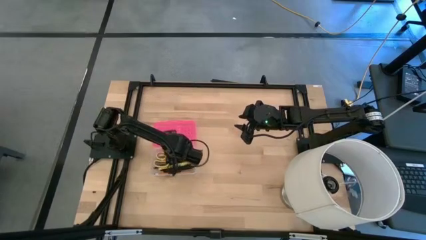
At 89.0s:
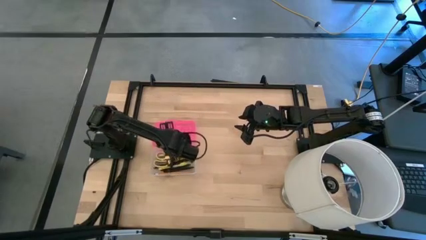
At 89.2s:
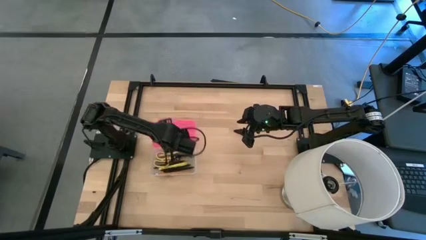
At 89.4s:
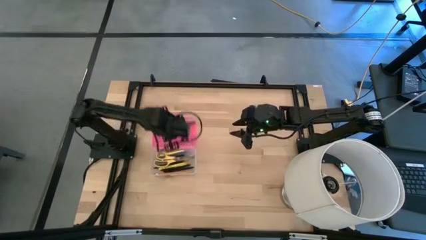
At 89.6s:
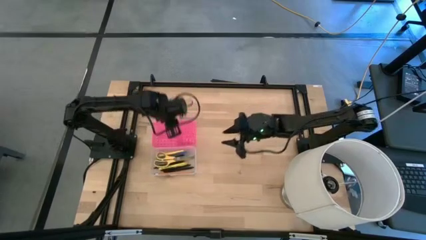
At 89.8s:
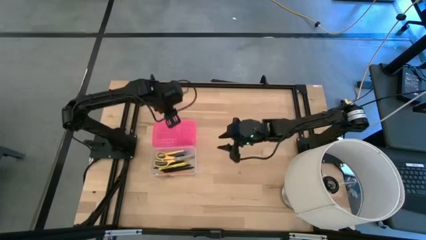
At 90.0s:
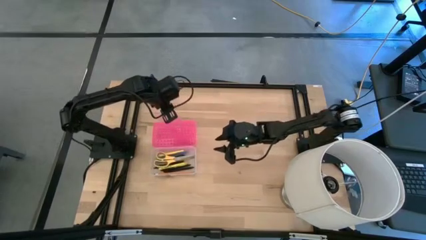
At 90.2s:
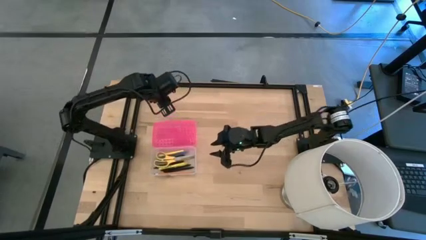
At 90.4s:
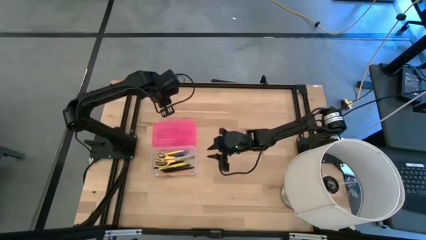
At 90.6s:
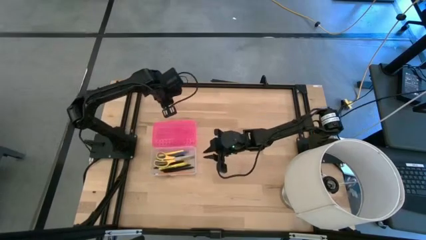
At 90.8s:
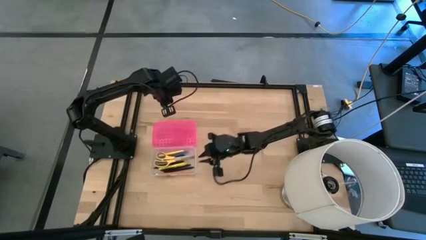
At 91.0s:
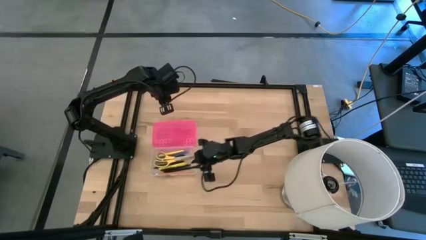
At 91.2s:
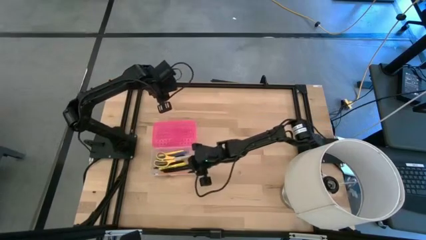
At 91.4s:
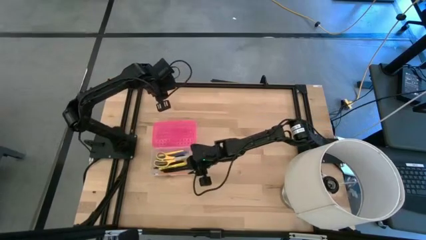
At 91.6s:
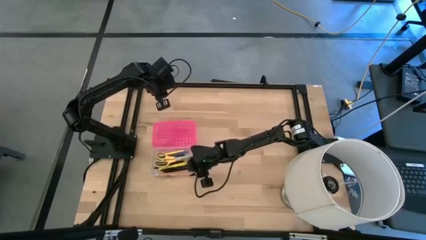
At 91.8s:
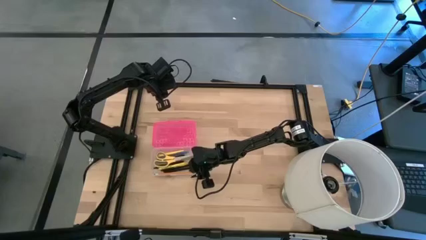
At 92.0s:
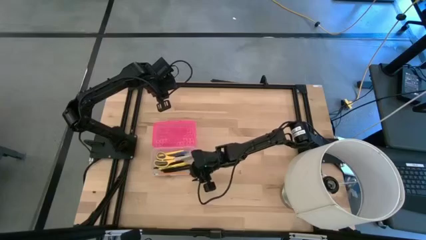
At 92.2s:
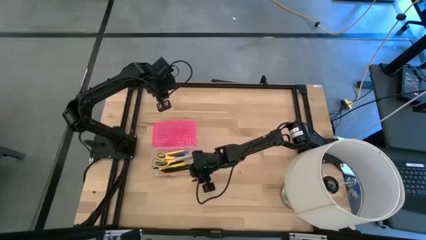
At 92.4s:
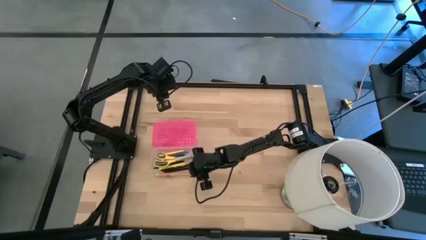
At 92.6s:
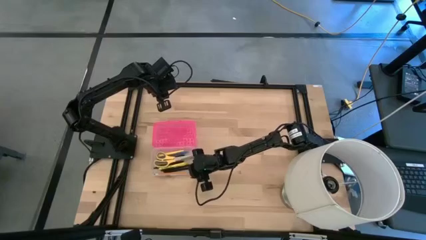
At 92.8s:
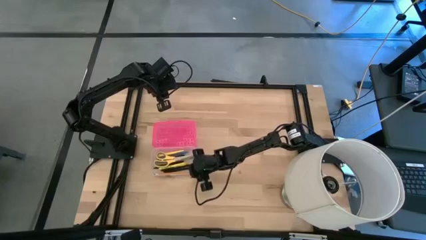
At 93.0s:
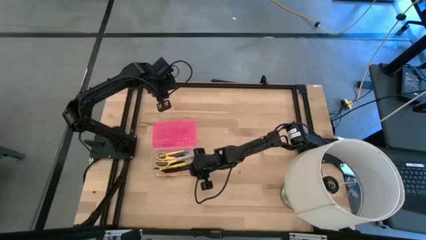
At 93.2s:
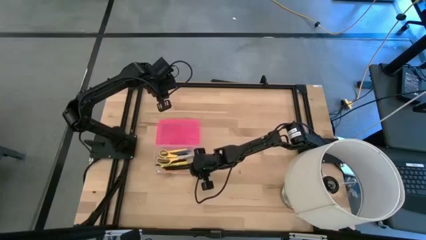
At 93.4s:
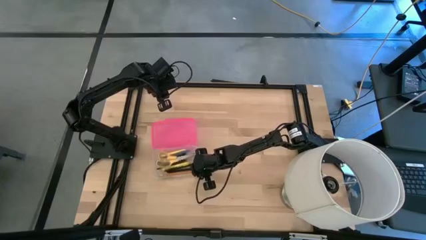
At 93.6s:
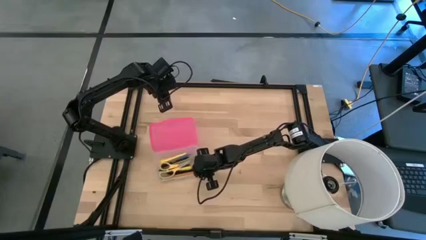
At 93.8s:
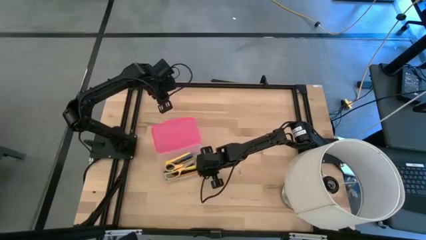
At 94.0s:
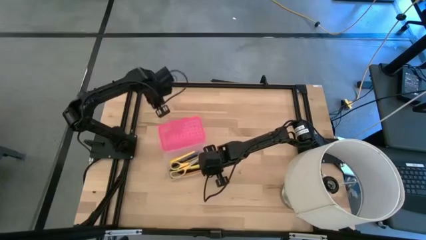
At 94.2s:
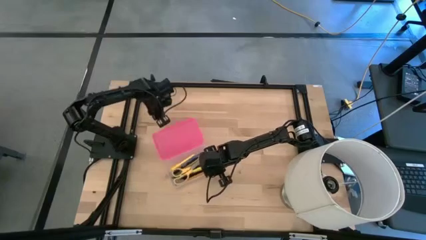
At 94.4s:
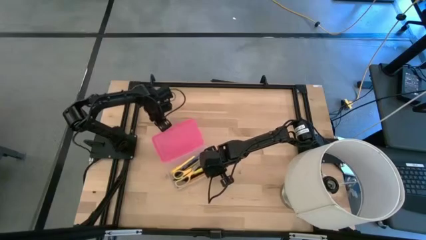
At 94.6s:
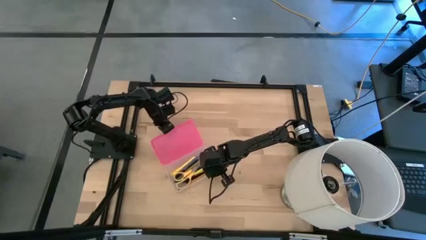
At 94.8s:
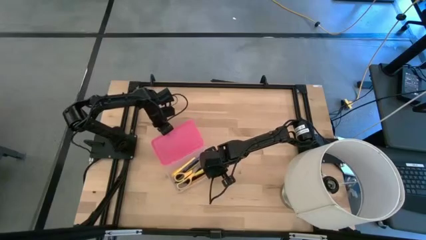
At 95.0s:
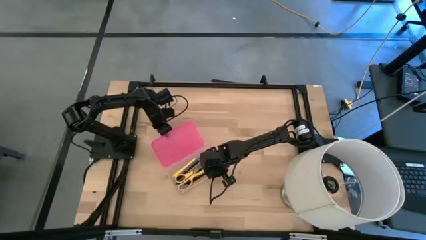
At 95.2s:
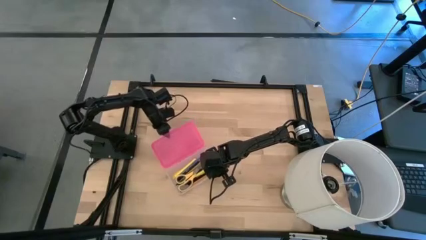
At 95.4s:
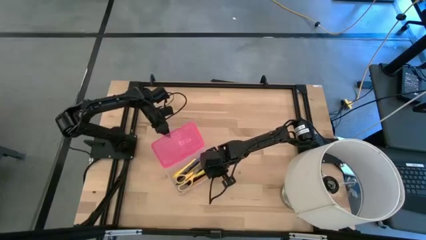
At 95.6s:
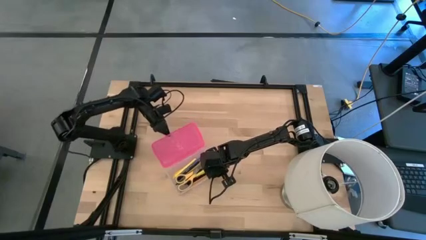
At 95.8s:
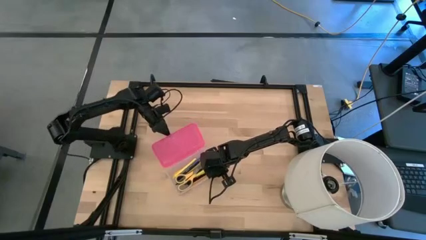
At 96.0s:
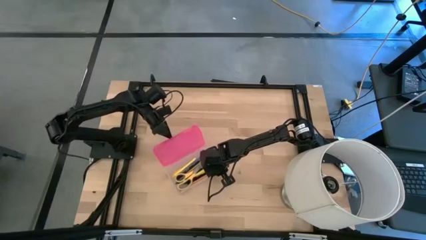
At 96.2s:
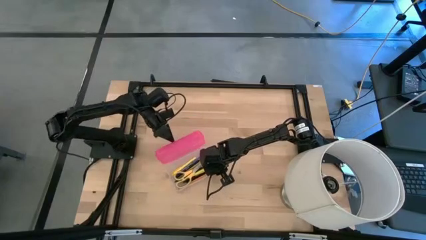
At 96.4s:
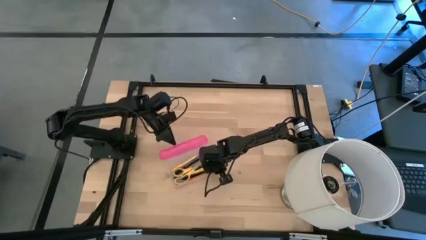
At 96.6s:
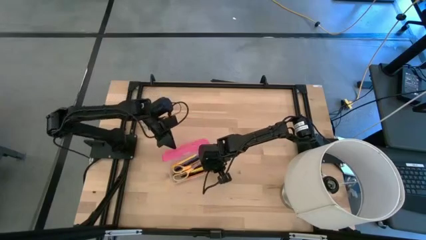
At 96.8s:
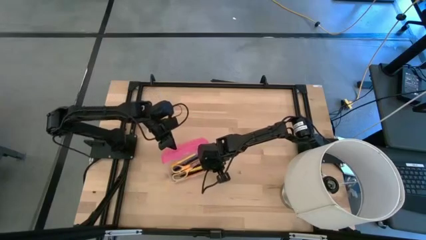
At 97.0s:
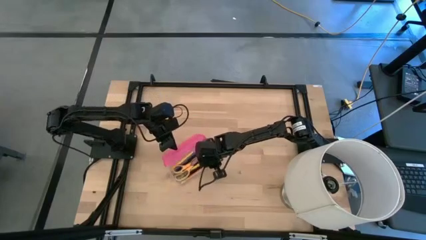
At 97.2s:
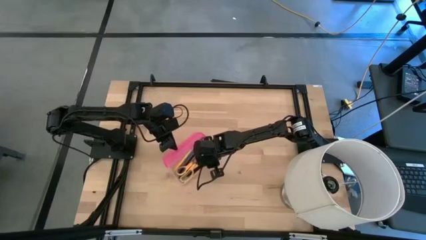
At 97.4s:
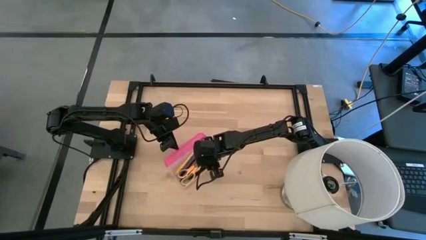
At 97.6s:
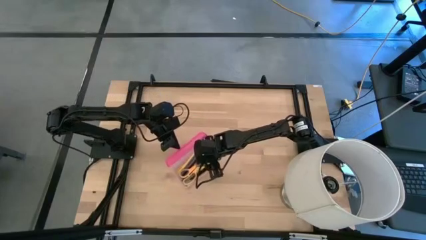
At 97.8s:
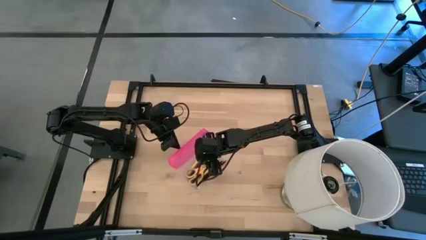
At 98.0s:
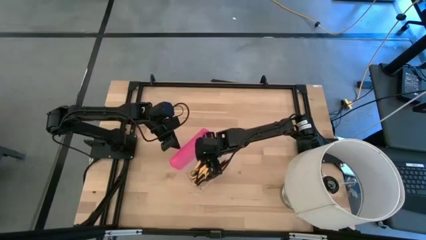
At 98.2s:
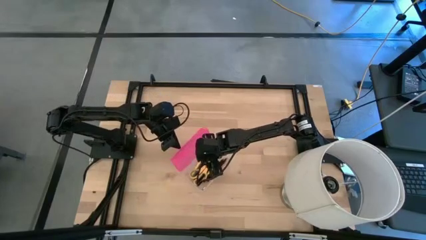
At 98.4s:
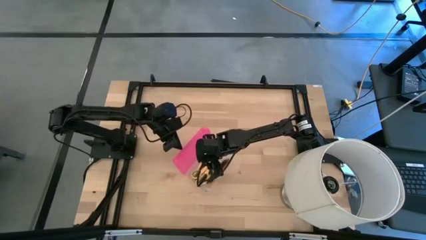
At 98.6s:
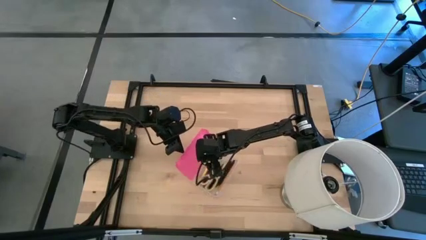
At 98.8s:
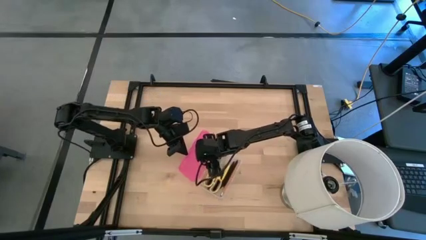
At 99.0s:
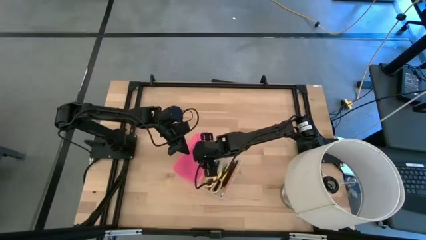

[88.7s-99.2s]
Task: Pick & place school supplies into a supply box
Close the pink supply box

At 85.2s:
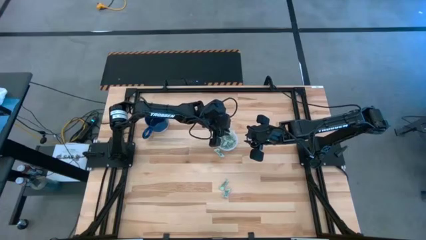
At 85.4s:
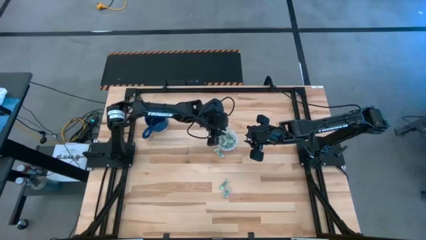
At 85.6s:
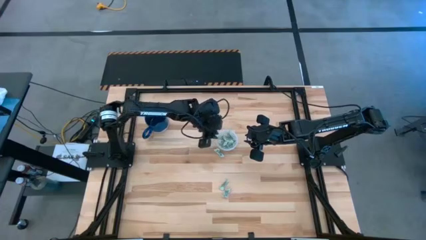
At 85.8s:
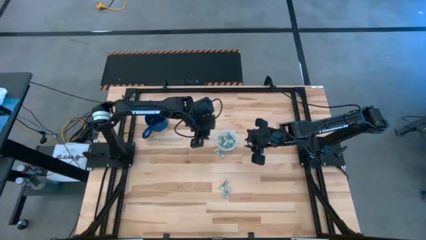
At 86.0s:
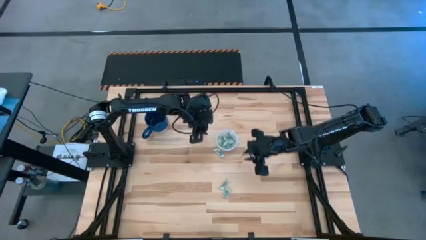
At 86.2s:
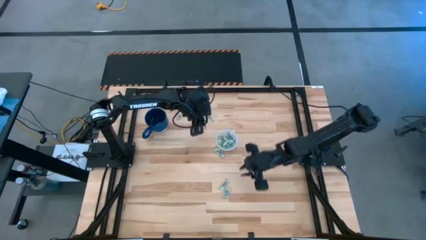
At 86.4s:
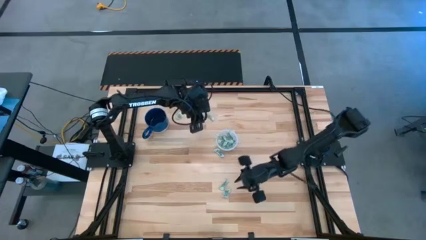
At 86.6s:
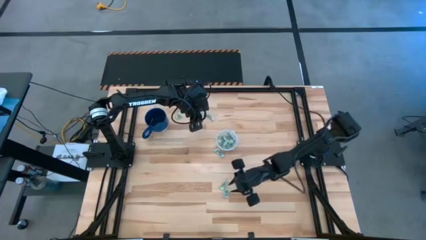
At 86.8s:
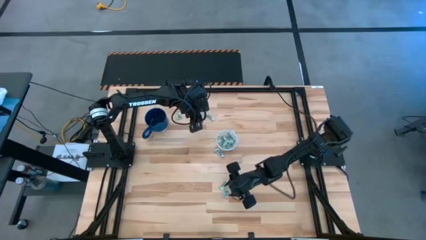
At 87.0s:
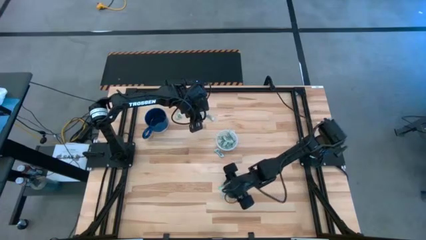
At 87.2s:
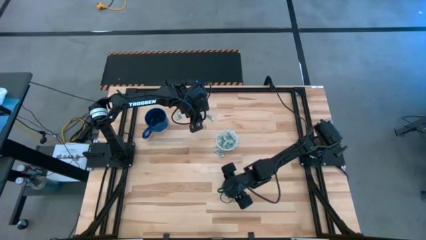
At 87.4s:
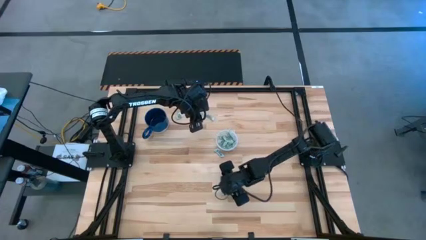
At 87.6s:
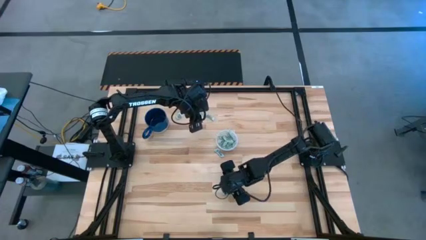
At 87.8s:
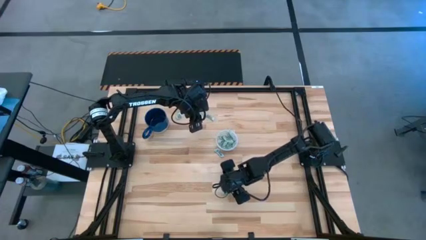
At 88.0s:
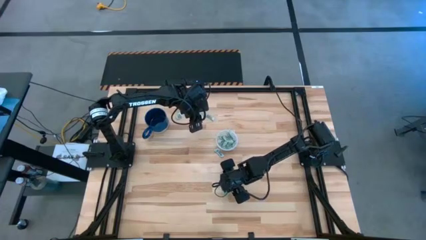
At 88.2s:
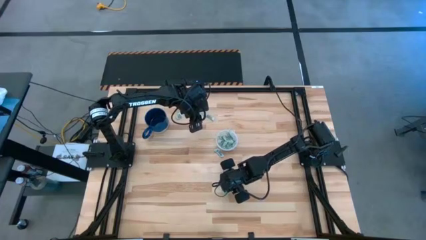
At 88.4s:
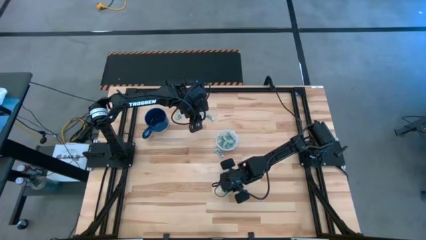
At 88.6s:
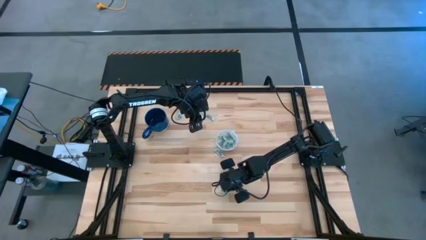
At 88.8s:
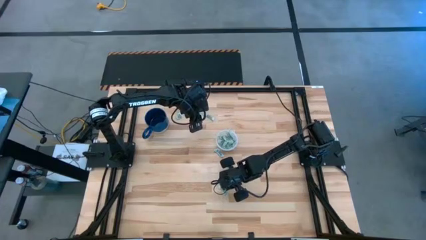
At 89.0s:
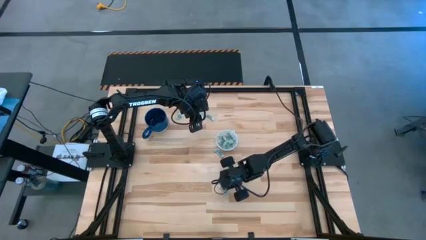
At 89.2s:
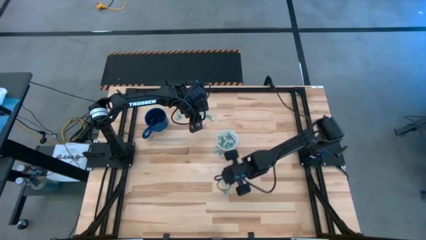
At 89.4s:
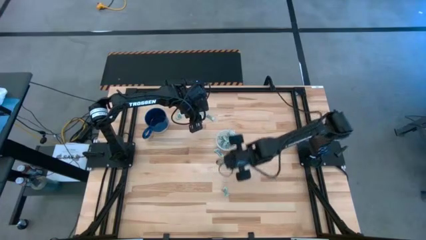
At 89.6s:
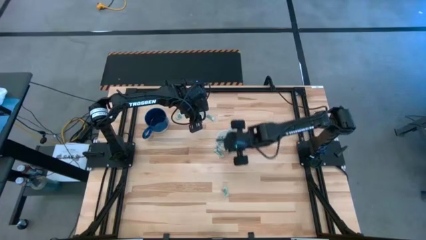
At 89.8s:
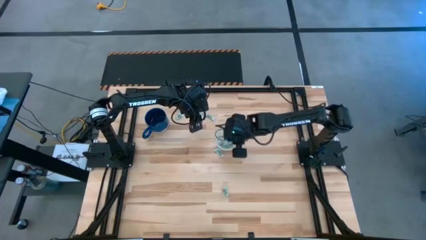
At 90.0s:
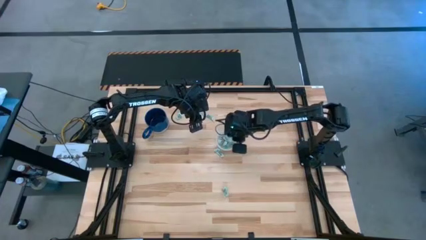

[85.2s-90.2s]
Task: Pick and place items into bin
Put the gray stevia packet into the transparent bin
